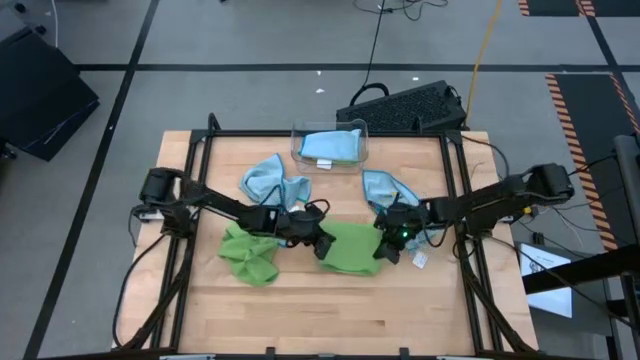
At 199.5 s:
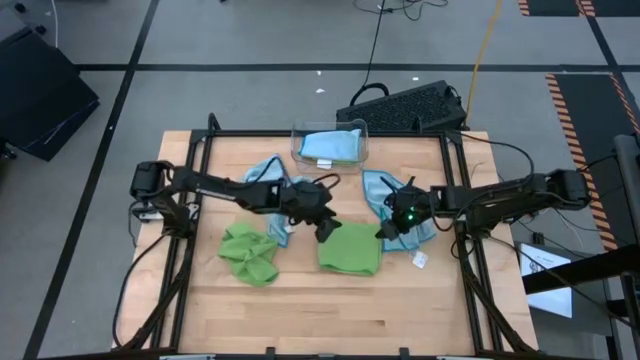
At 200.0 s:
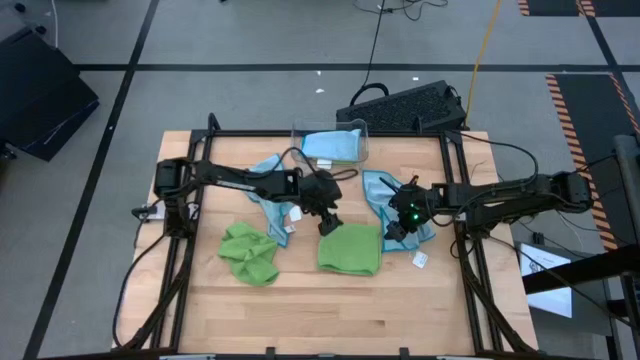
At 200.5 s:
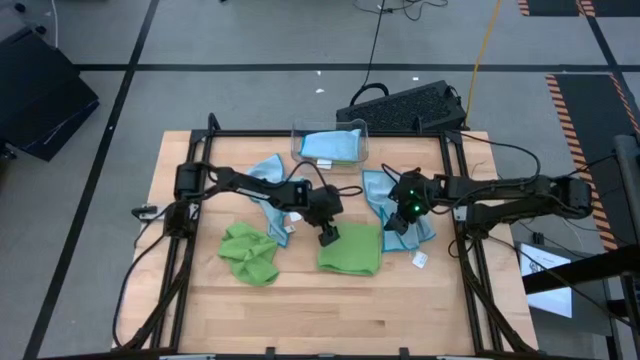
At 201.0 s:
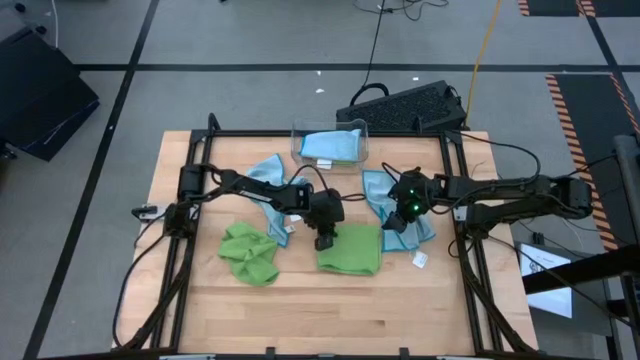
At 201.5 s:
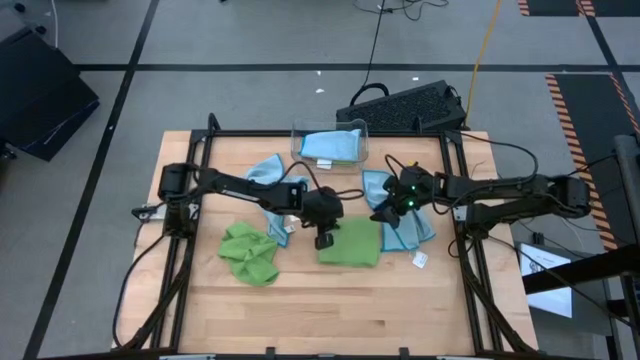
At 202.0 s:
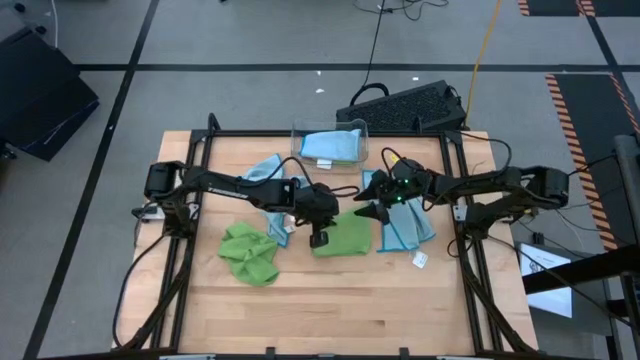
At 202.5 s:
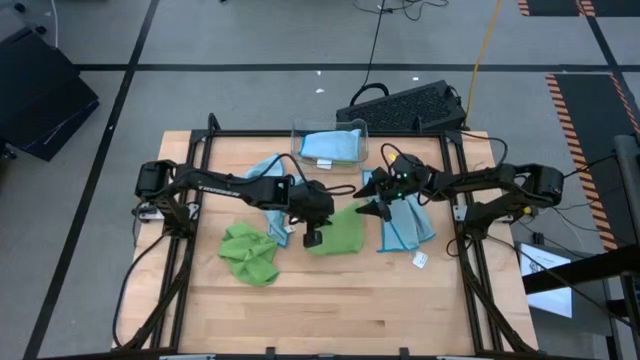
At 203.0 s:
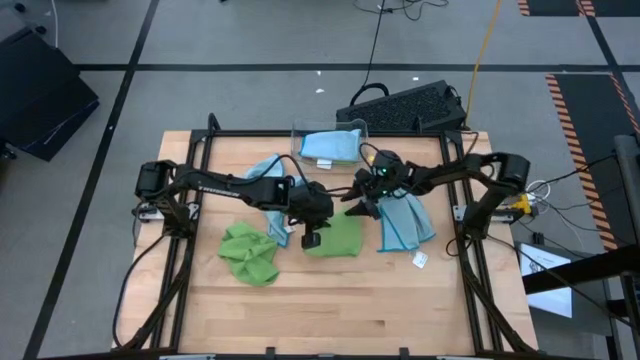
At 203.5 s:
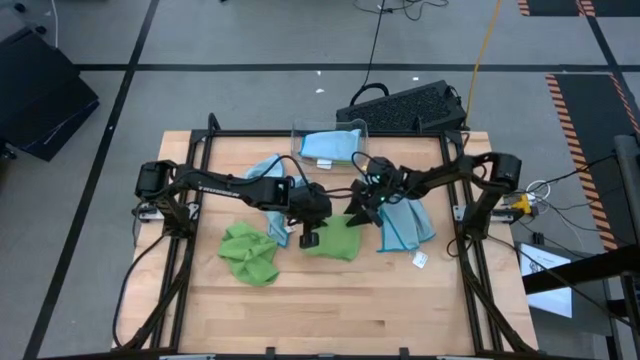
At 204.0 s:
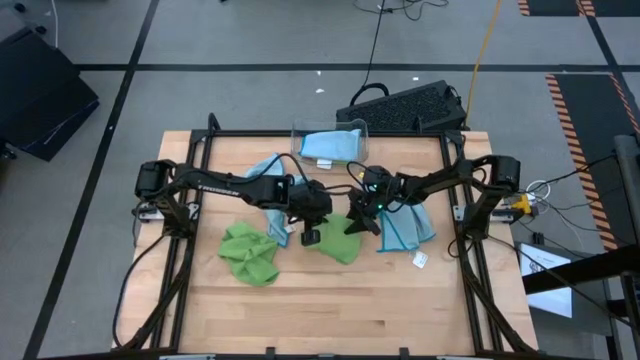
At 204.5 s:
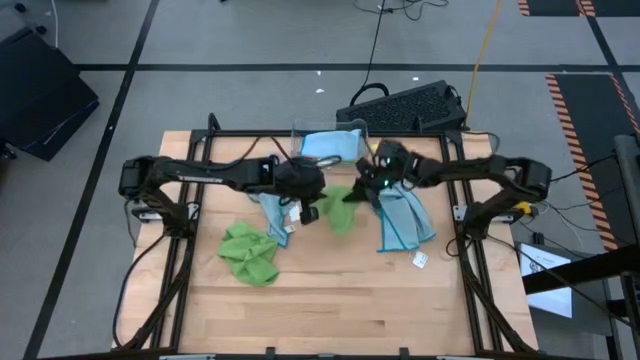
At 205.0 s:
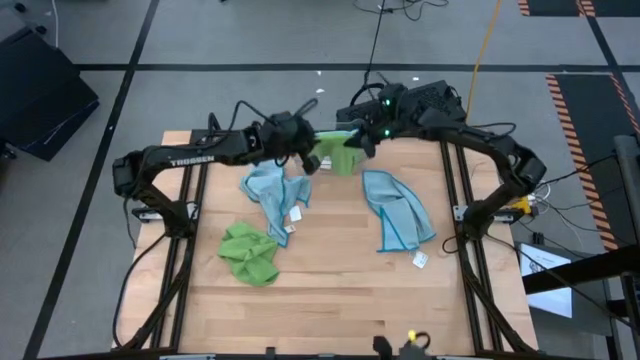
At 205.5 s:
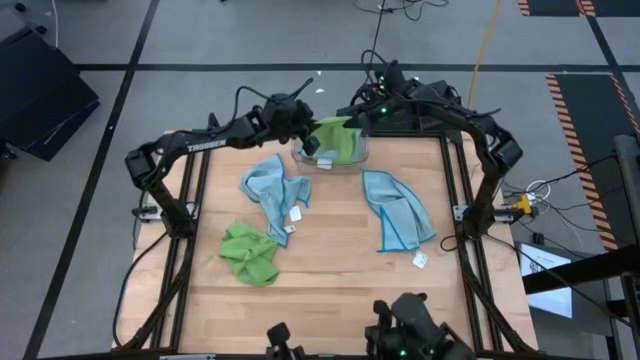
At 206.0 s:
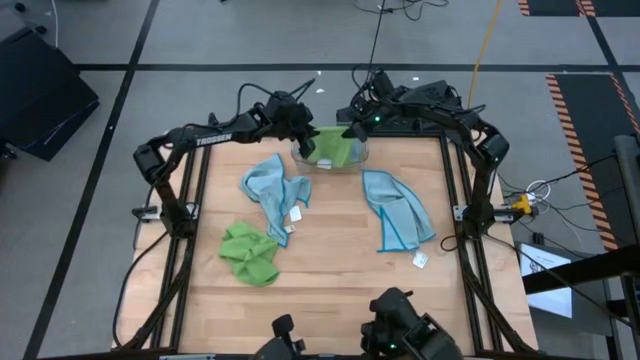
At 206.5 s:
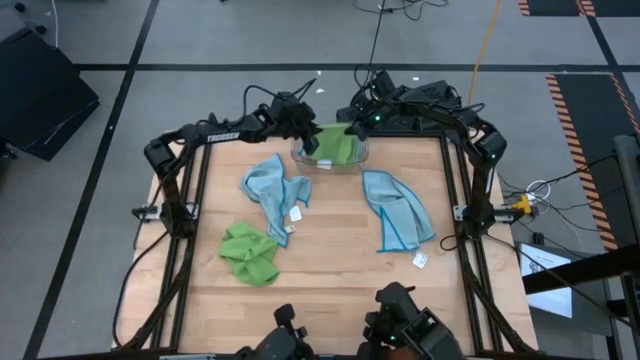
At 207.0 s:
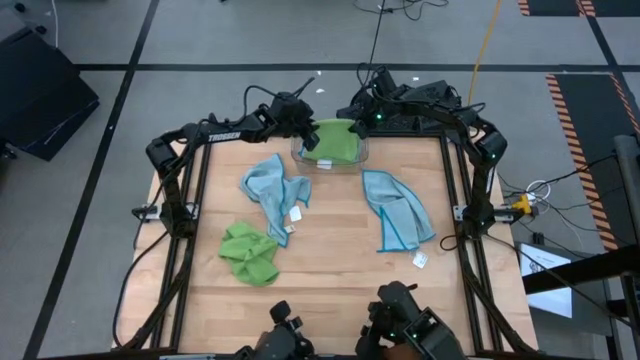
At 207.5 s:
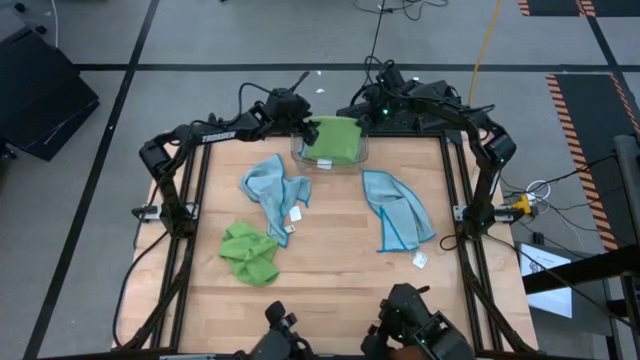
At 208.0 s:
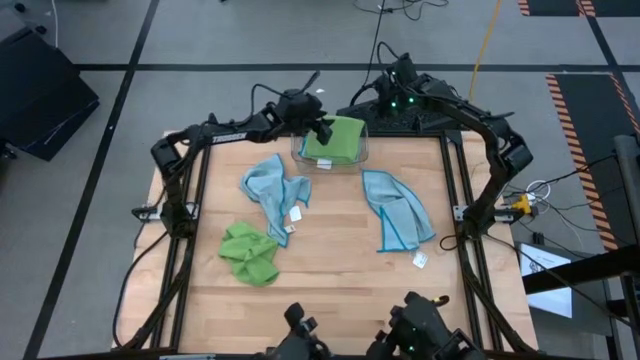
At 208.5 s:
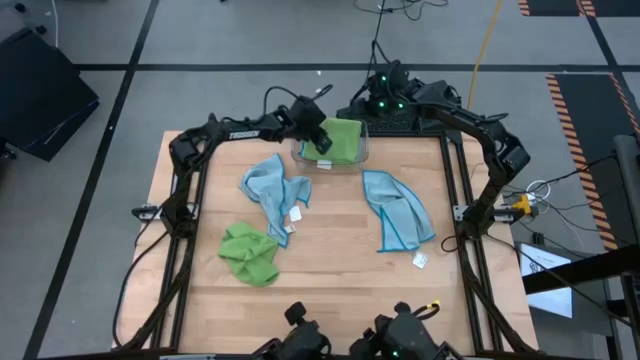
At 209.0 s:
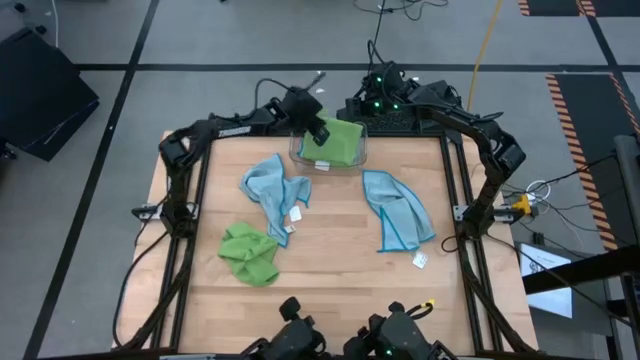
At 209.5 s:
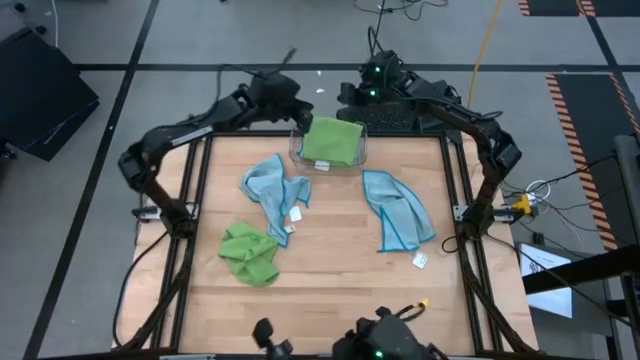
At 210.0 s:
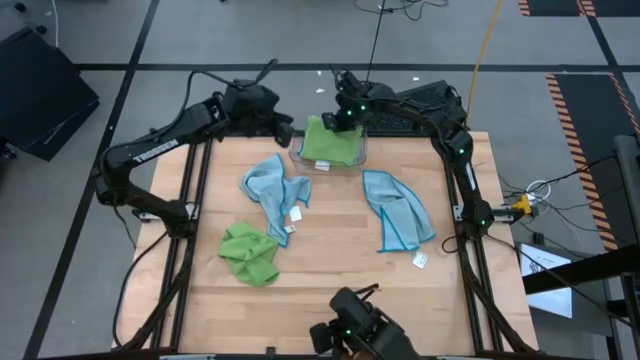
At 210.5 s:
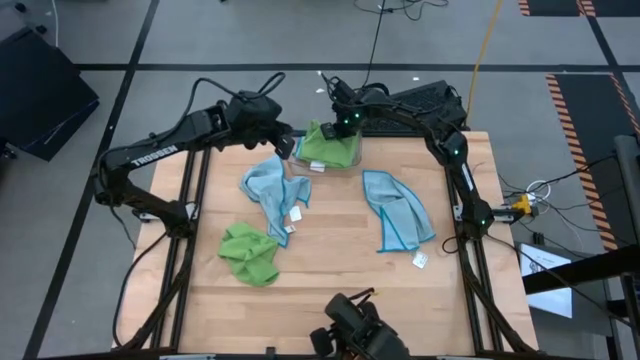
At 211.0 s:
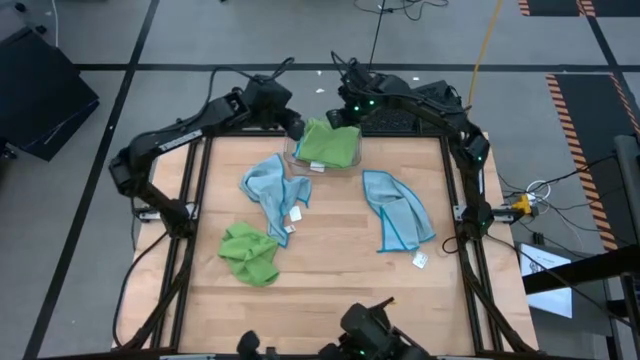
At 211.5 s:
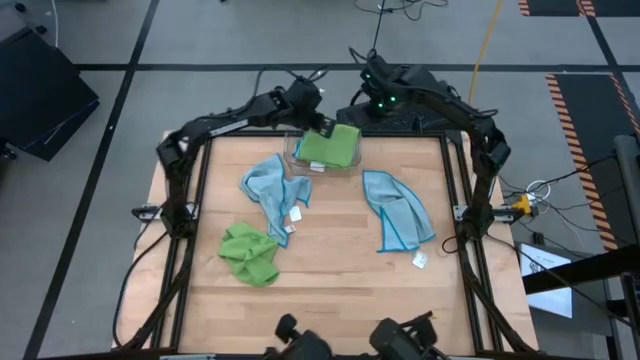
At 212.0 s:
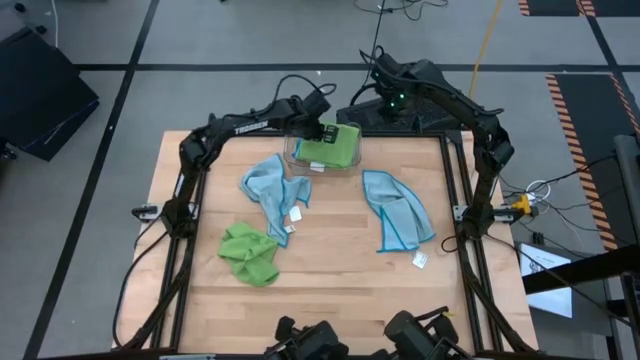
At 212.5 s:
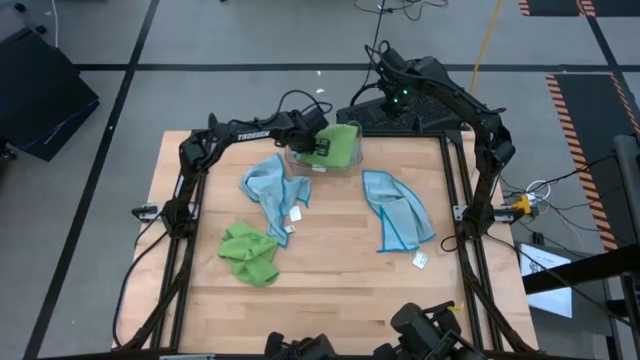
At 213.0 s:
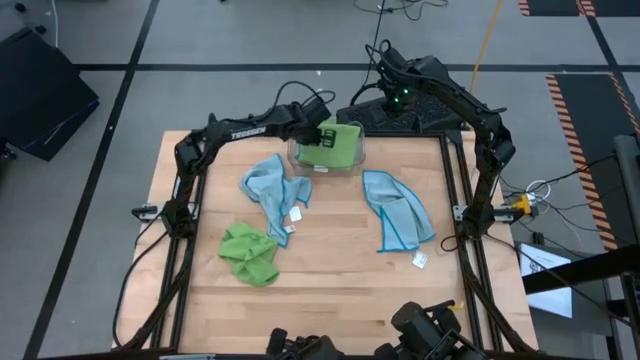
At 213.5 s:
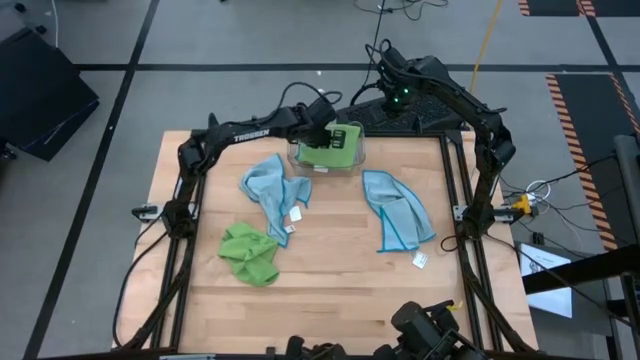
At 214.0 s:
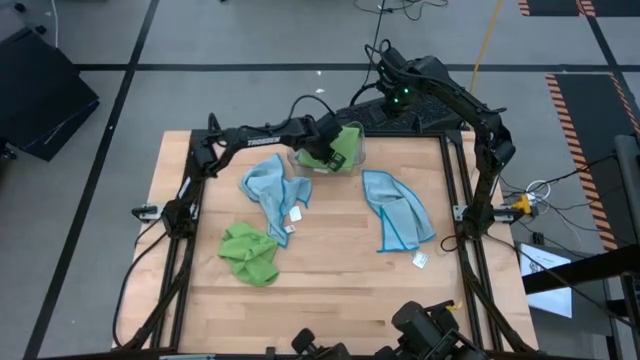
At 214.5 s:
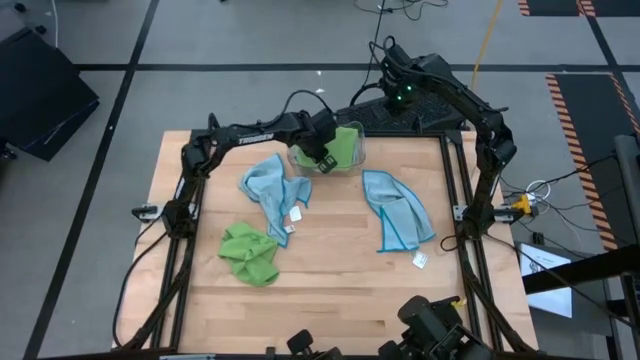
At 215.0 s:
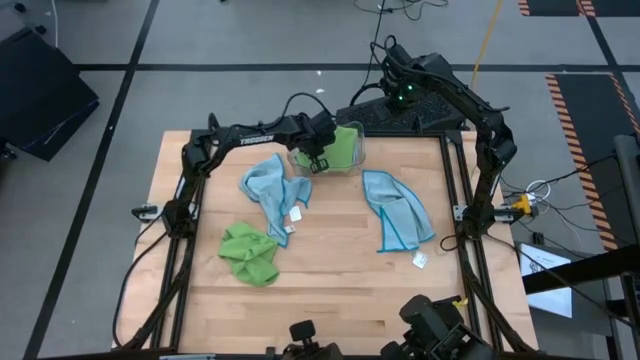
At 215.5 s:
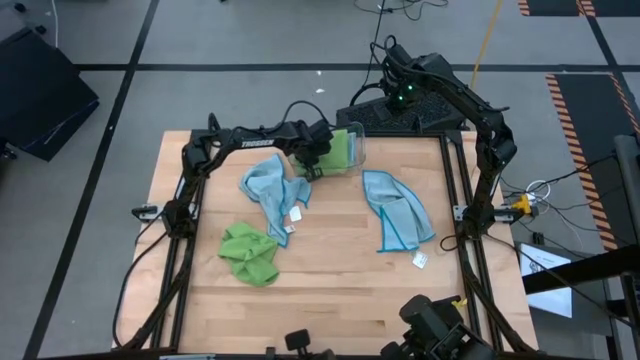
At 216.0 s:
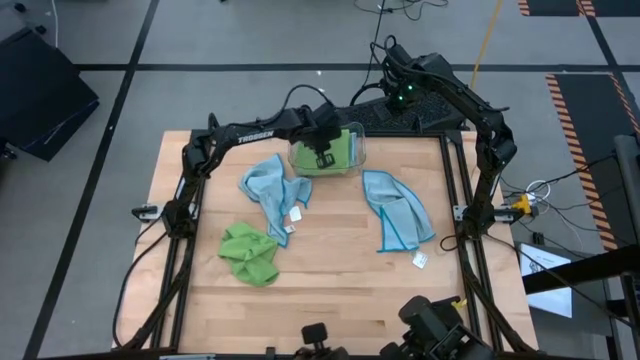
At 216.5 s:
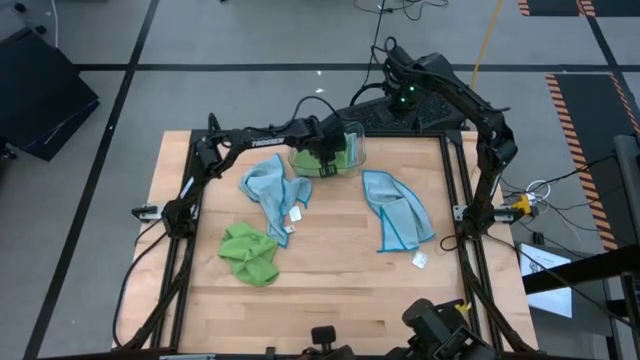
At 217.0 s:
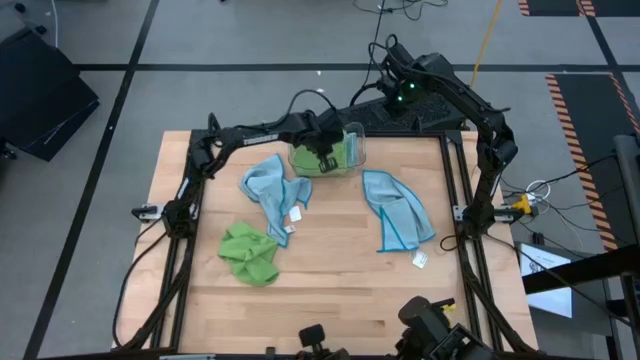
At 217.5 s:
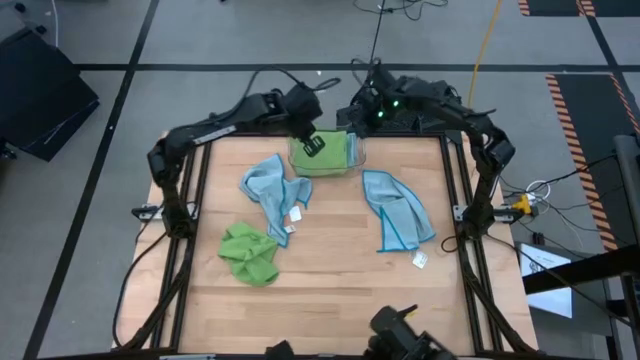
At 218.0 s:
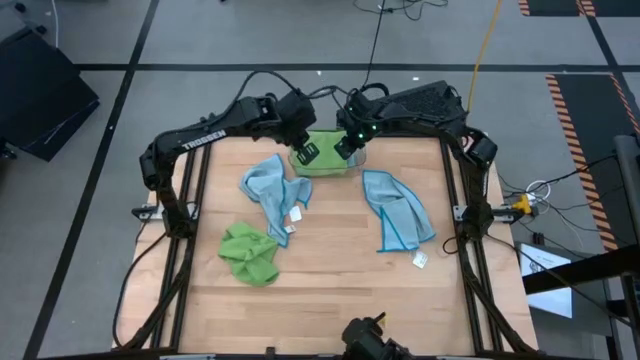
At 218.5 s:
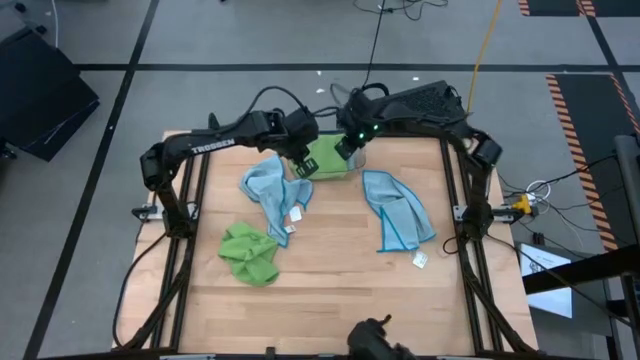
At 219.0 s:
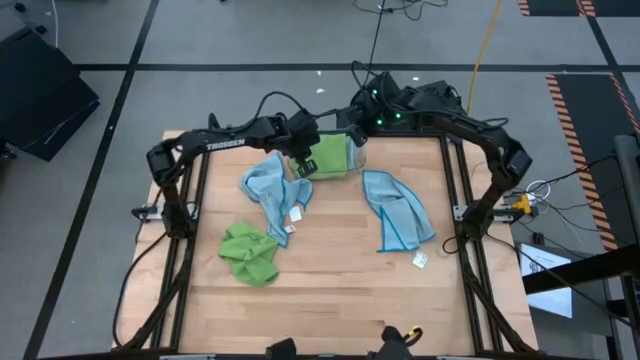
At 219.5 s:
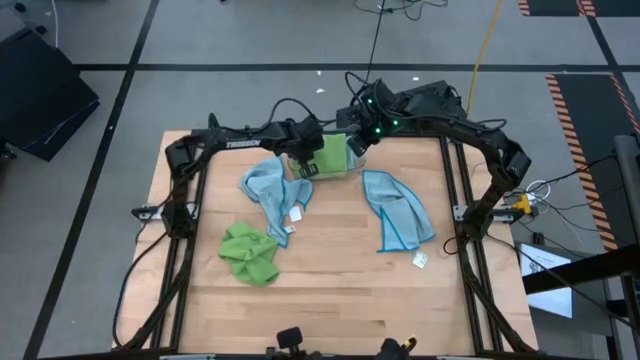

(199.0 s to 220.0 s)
Task: Fold microfiber towels
Put the right folded green microfiber cloth into the transparent bin
